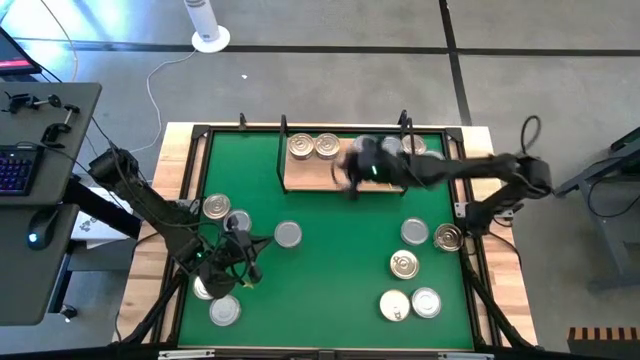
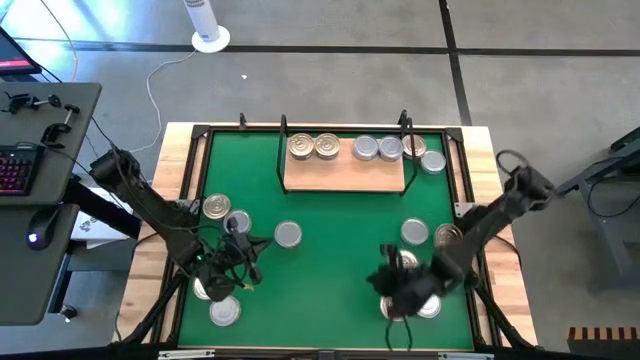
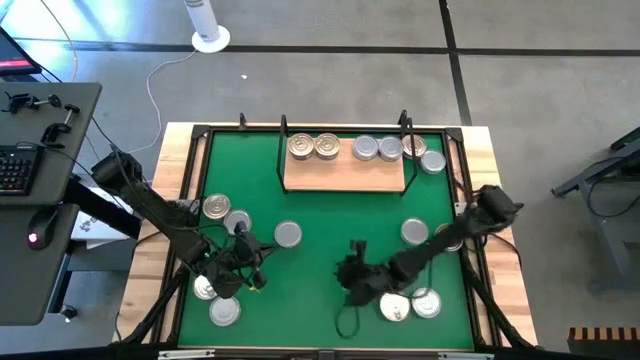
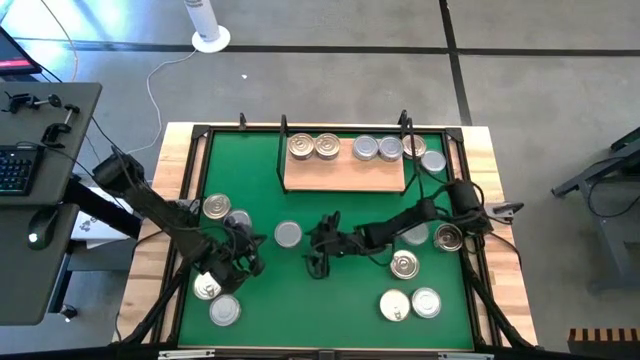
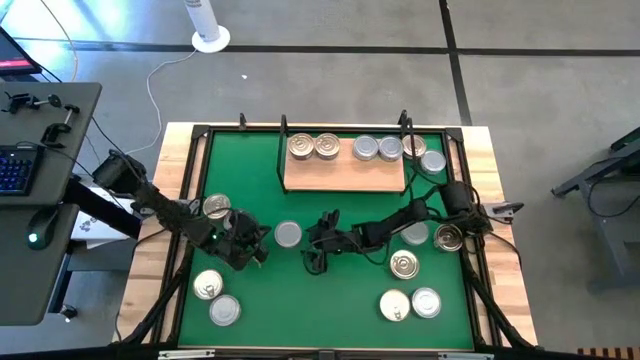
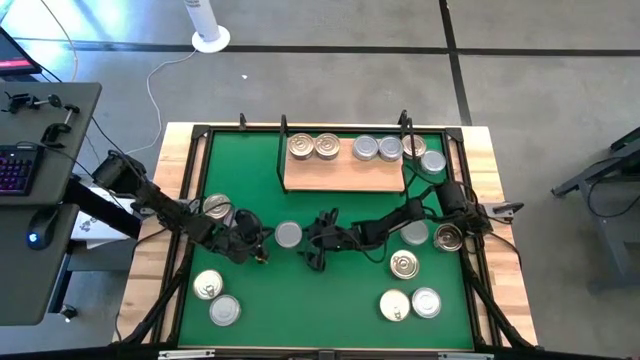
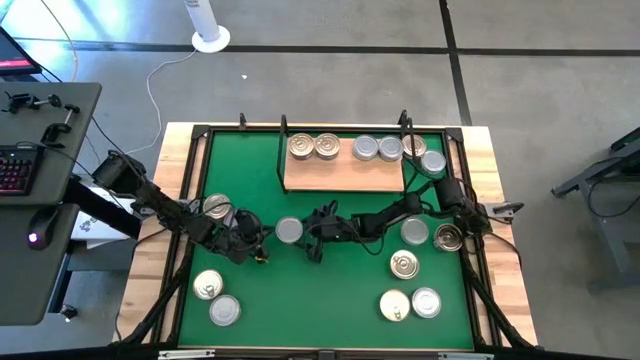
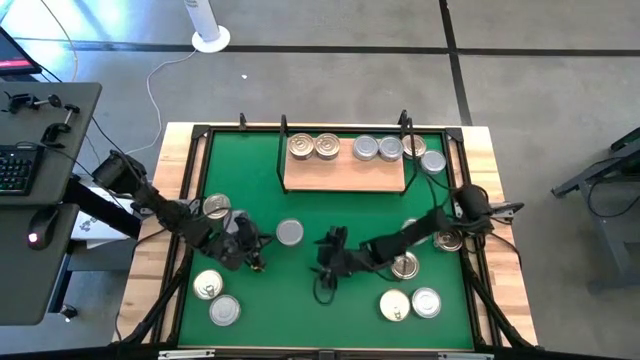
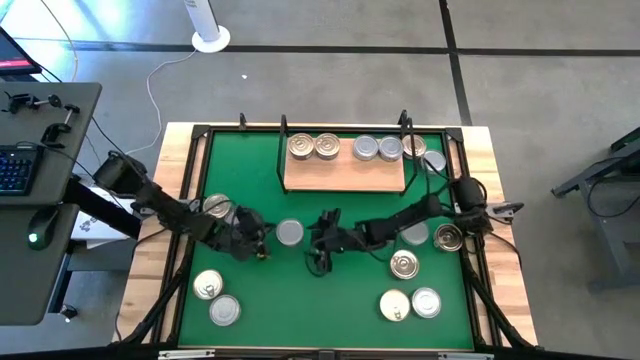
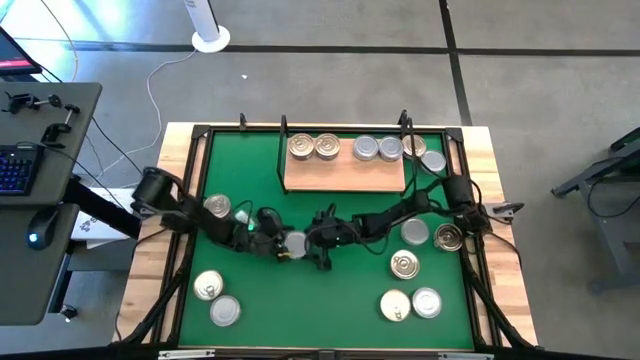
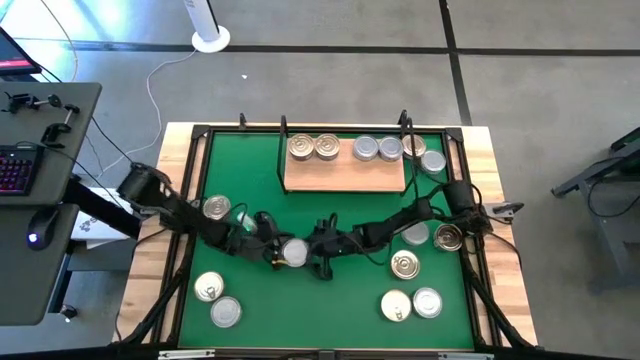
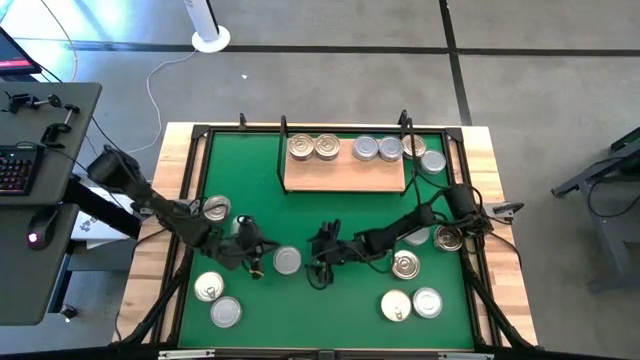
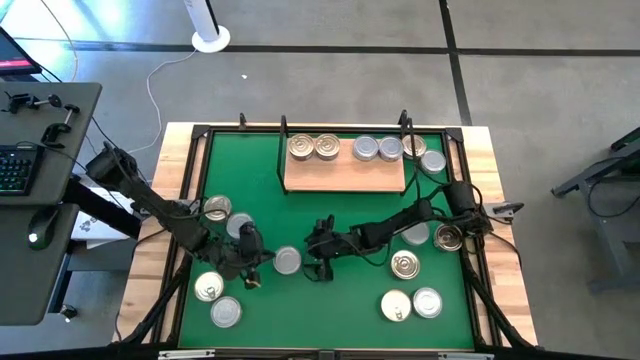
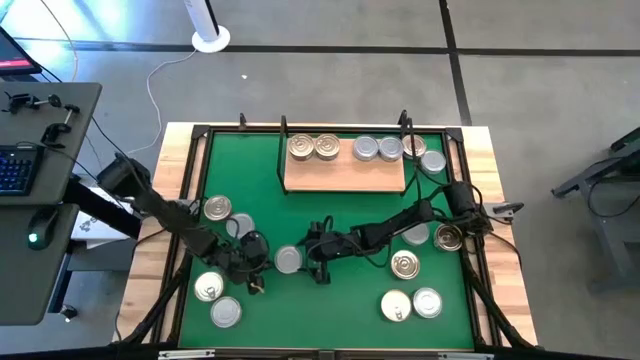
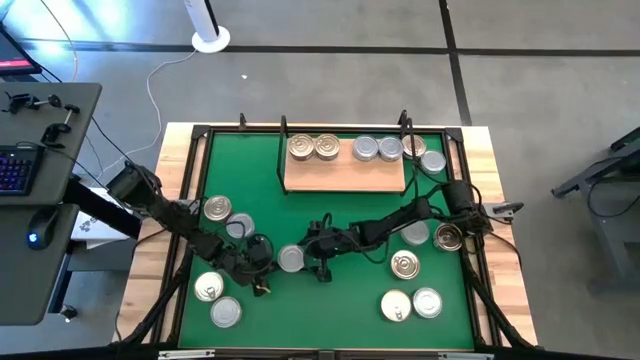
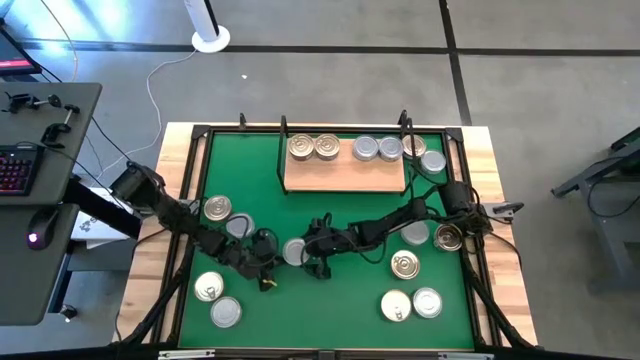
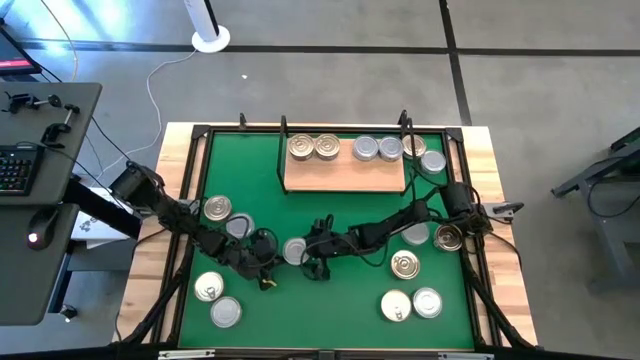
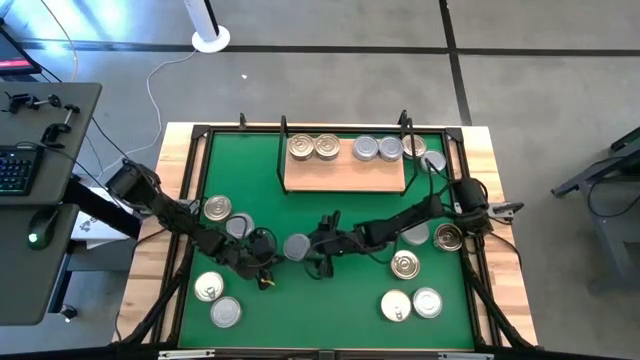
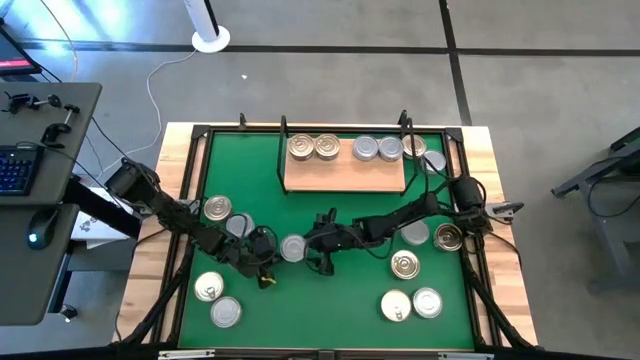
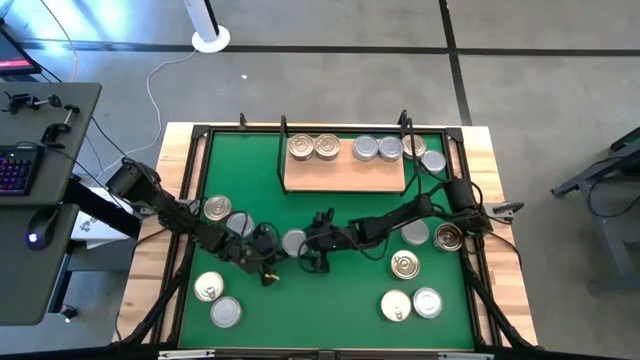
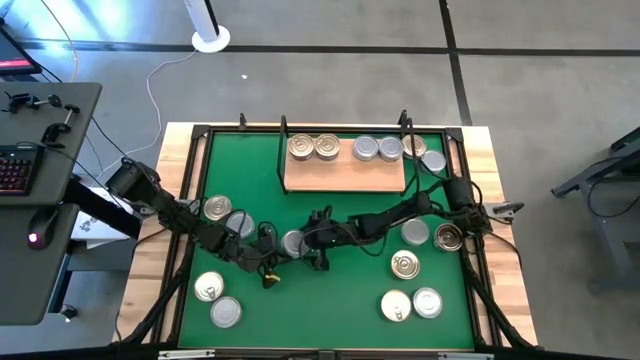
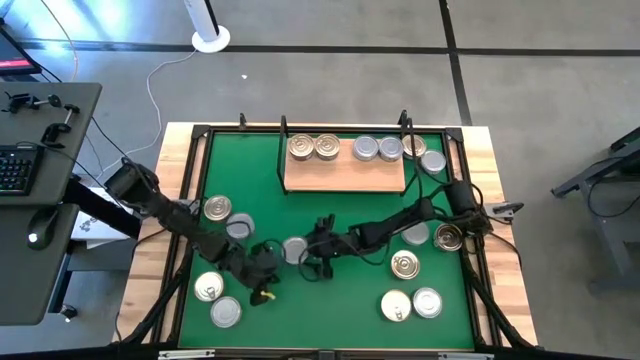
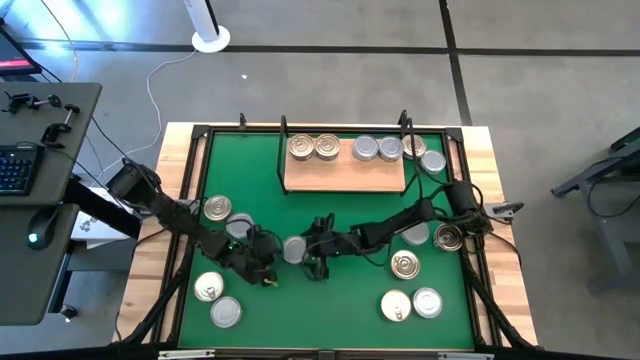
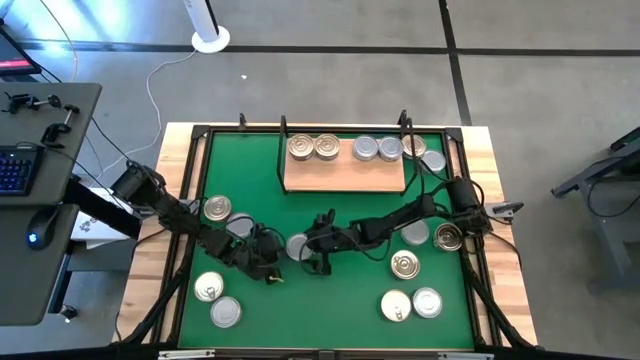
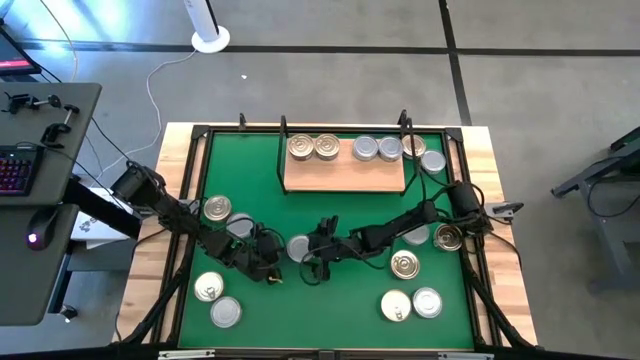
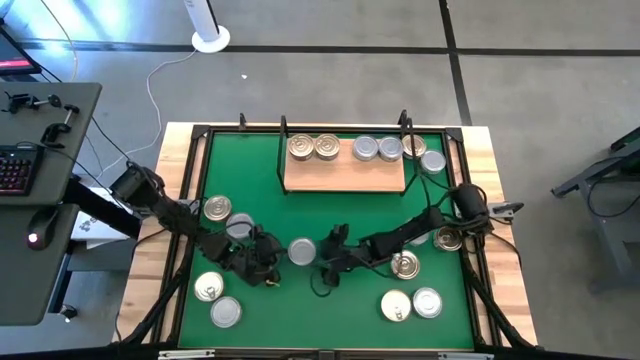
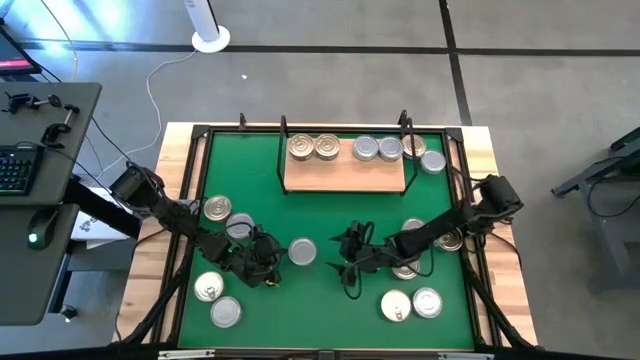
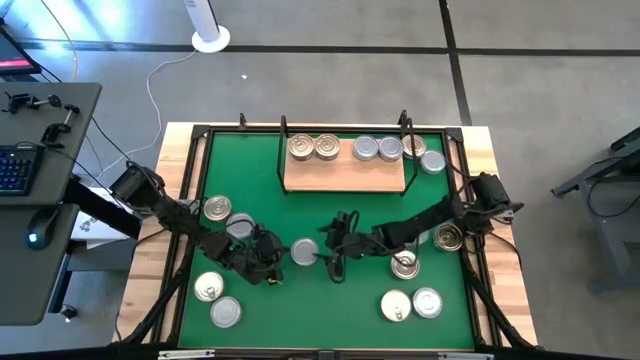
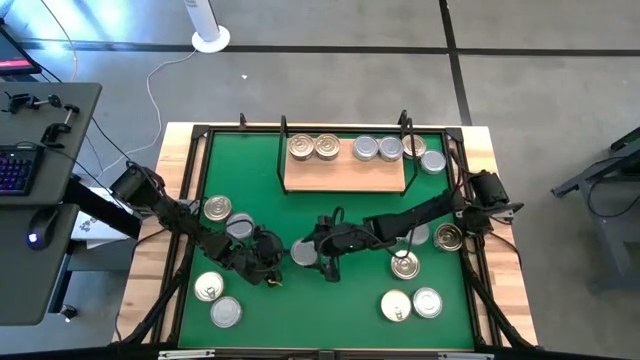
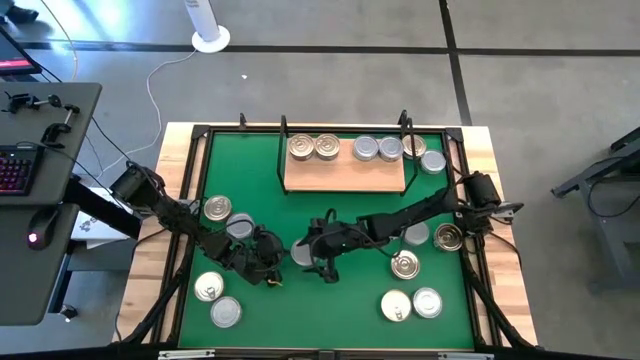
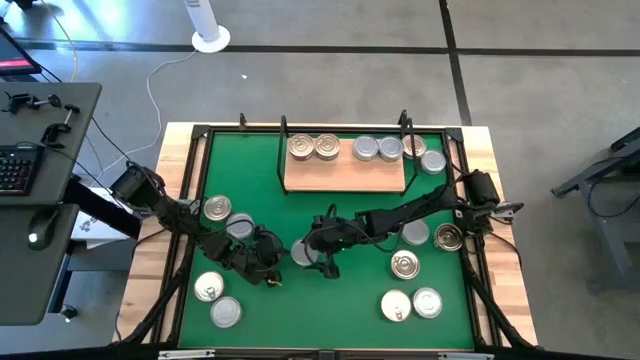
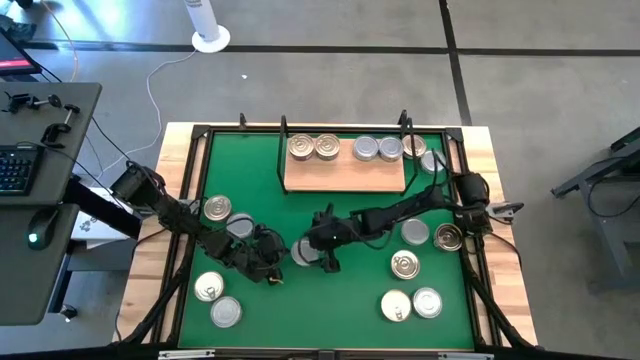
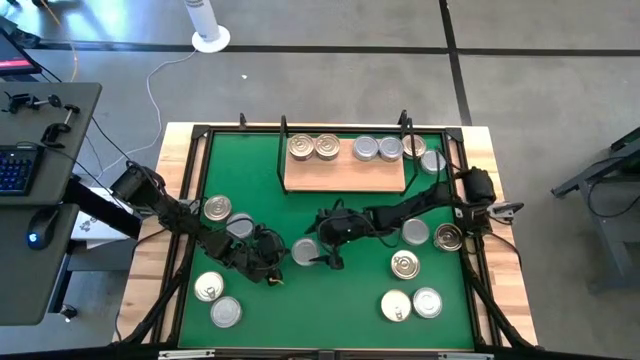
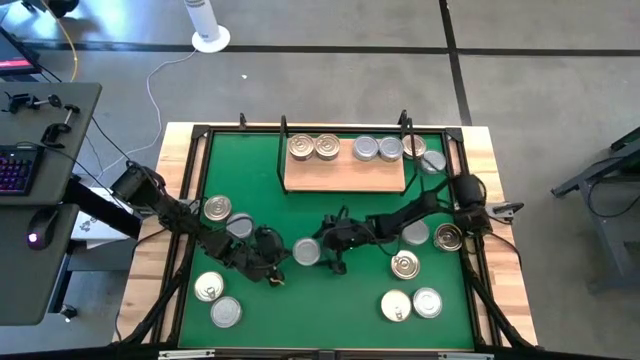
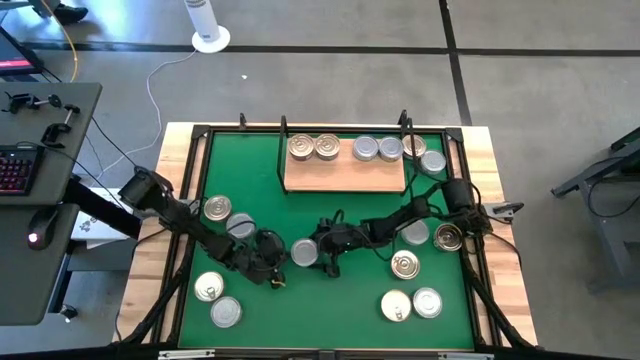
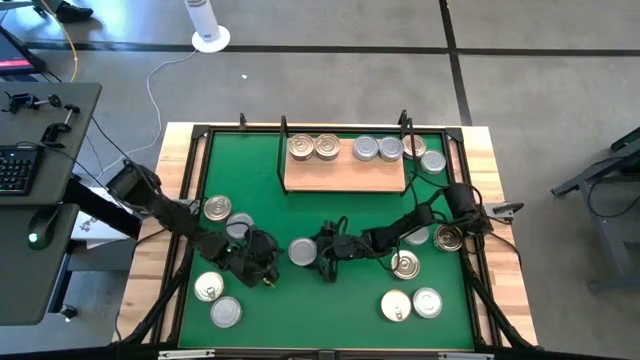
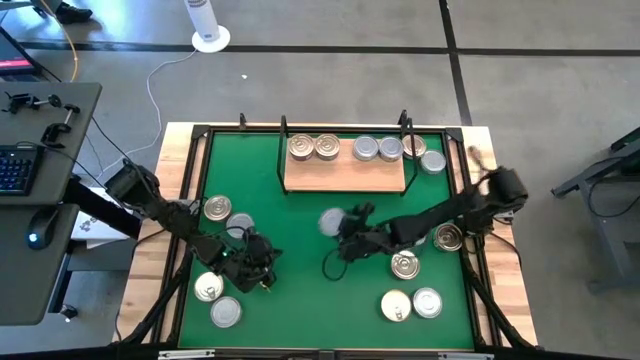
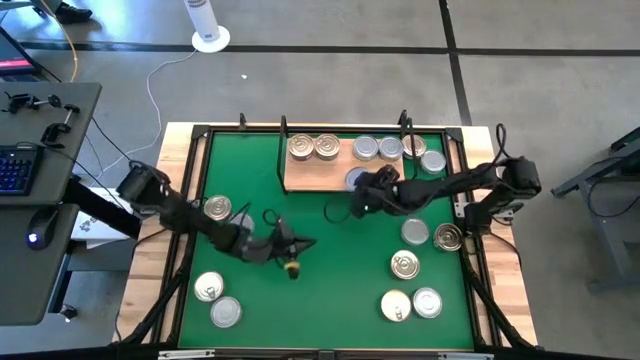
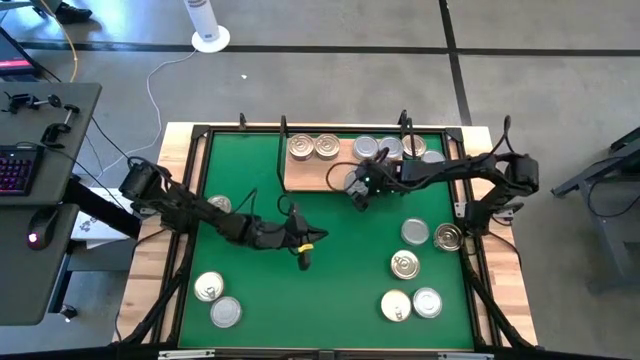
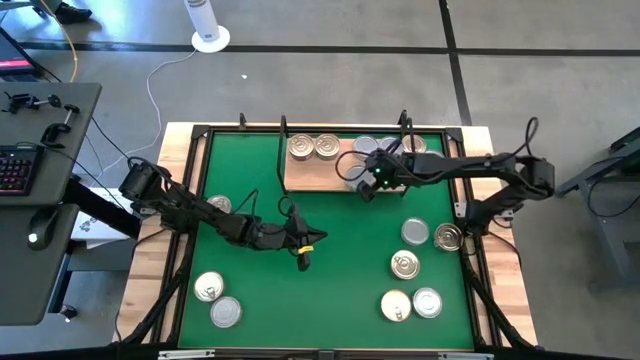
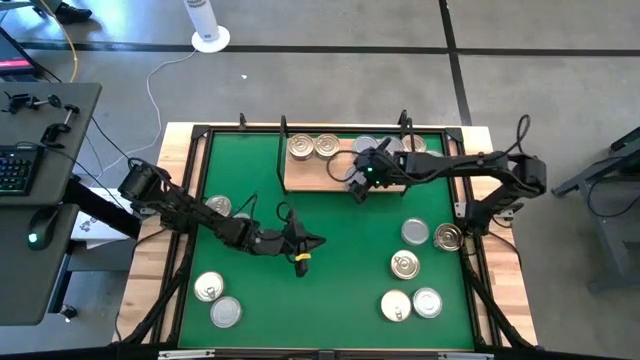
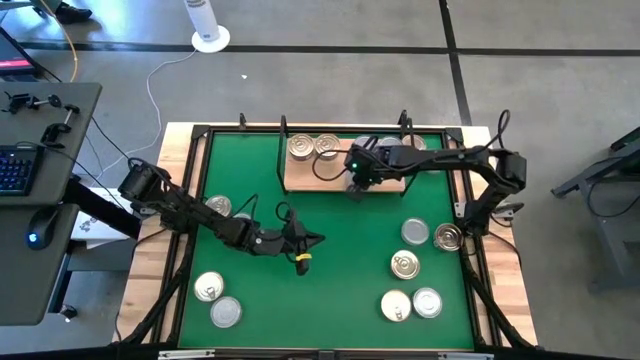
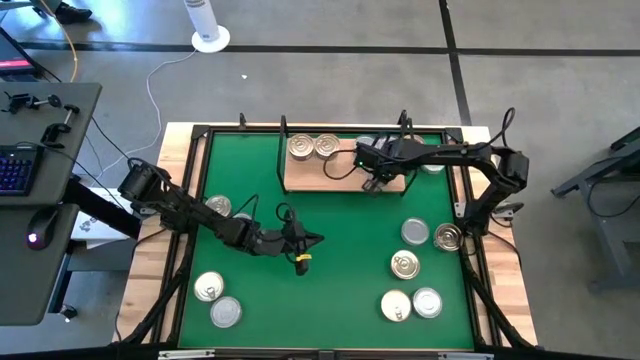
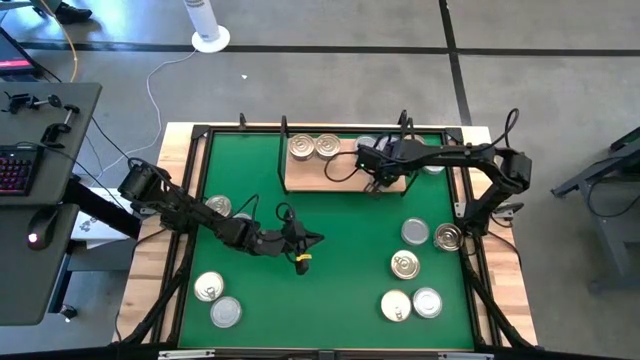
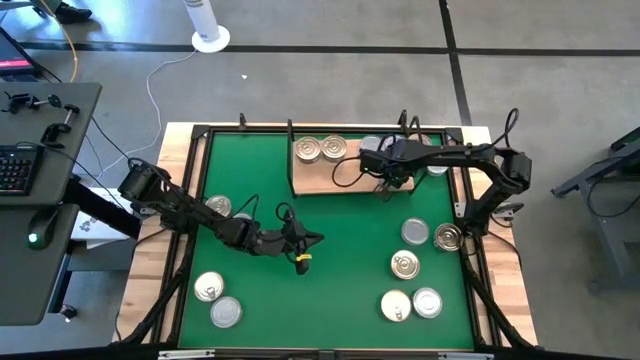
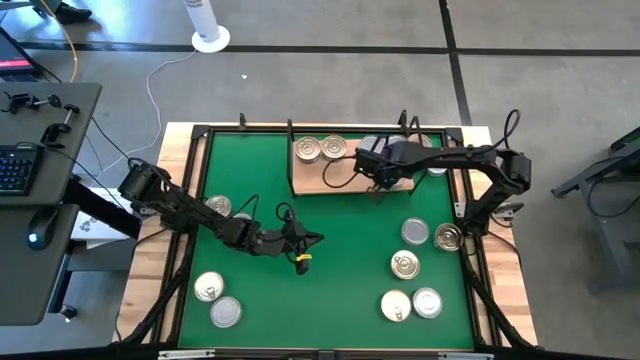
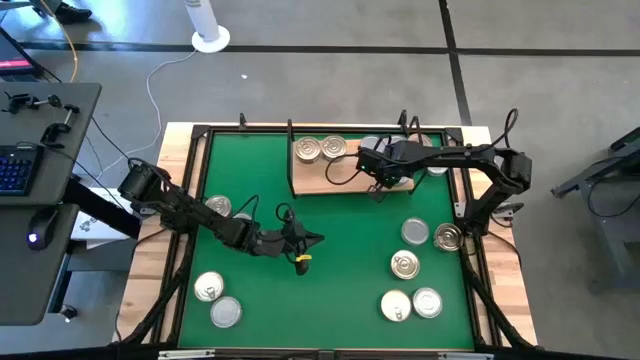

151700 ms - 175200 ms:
Task: Stack canned seafood by type on shelf
Put the green tuna can on the shelf and align with the other green tuna can
